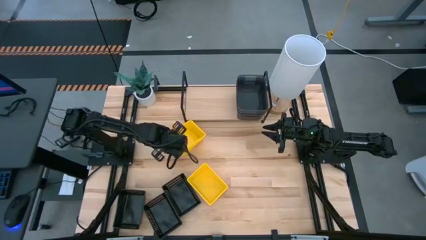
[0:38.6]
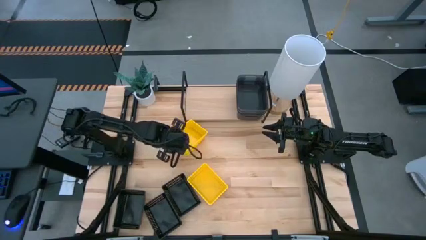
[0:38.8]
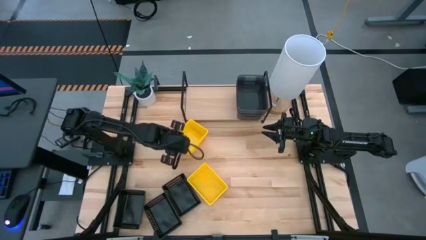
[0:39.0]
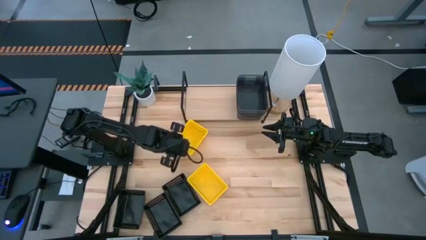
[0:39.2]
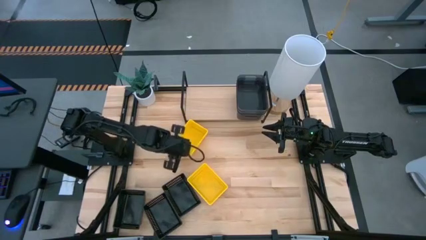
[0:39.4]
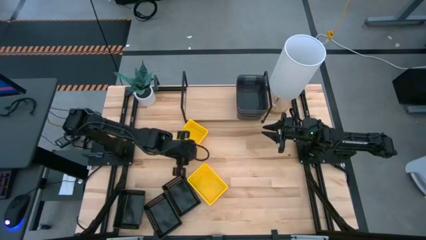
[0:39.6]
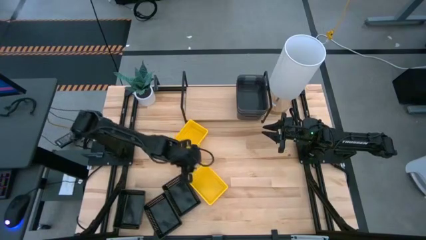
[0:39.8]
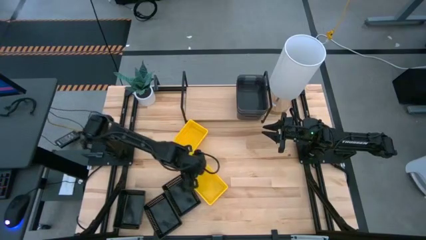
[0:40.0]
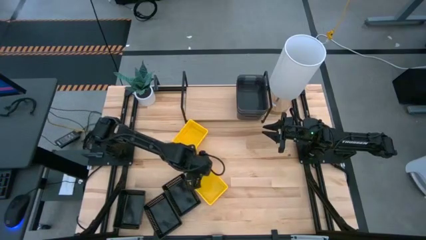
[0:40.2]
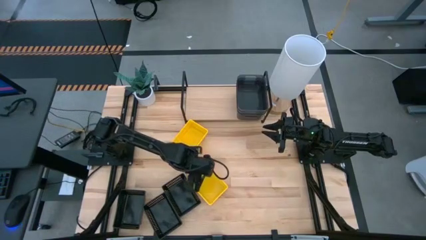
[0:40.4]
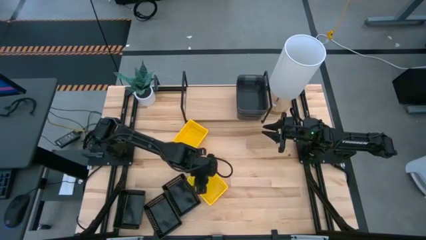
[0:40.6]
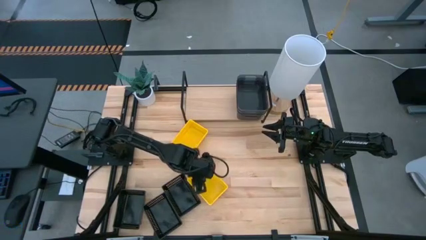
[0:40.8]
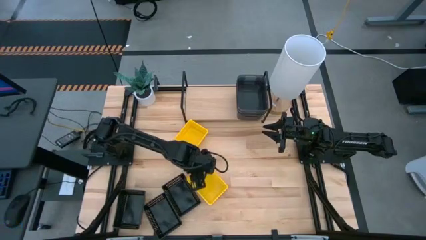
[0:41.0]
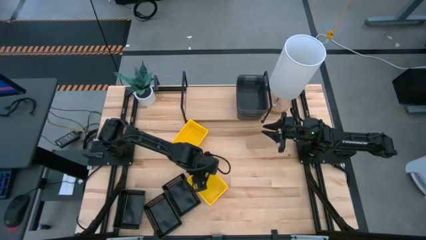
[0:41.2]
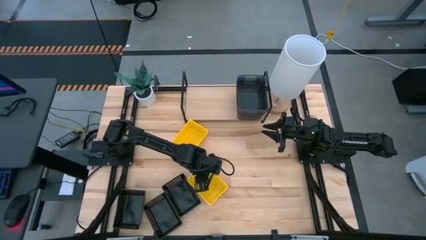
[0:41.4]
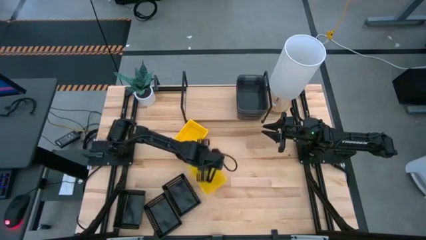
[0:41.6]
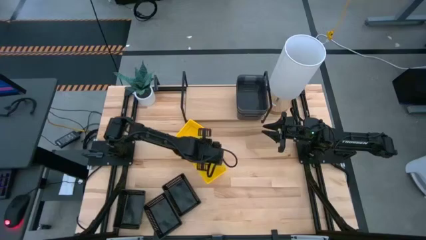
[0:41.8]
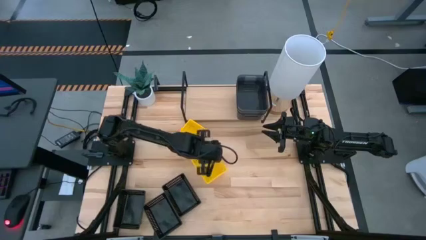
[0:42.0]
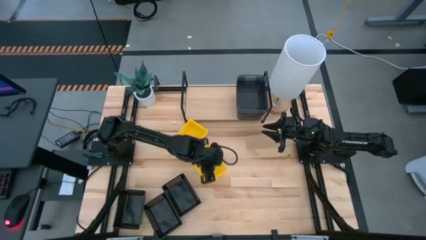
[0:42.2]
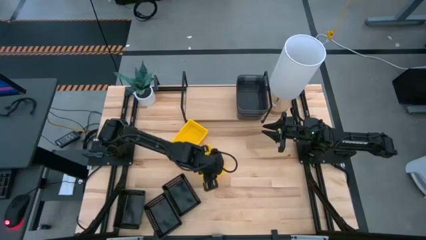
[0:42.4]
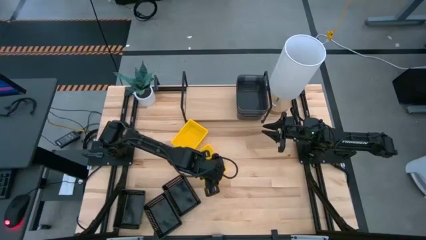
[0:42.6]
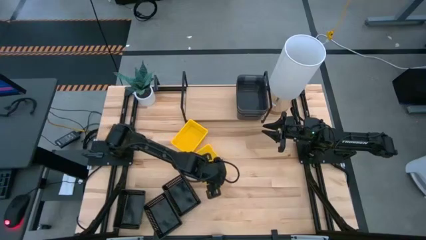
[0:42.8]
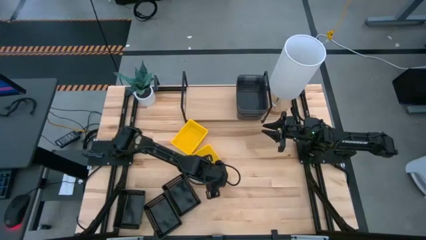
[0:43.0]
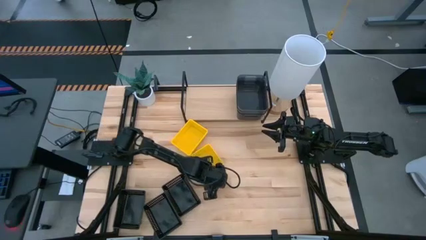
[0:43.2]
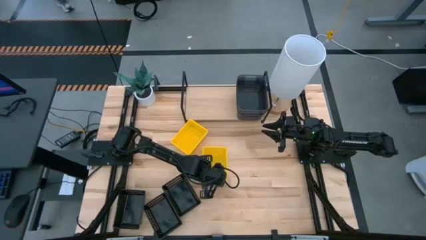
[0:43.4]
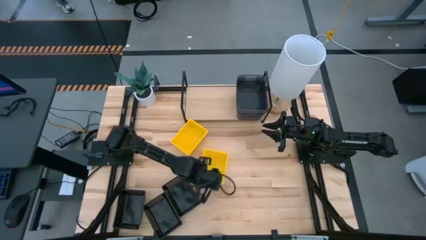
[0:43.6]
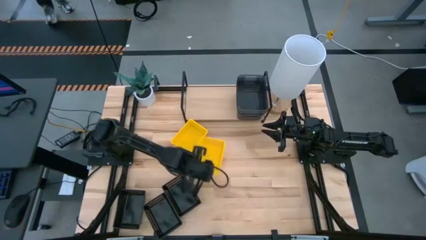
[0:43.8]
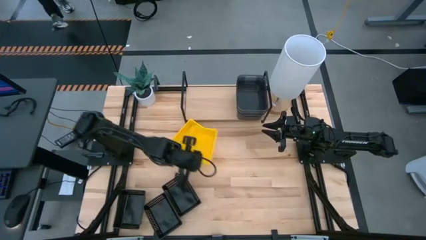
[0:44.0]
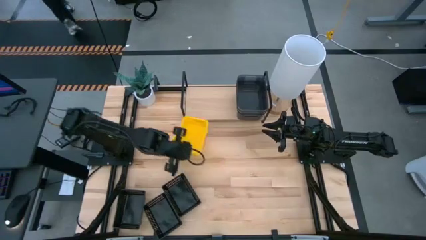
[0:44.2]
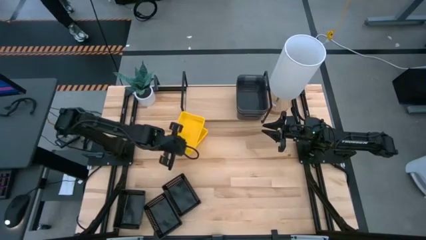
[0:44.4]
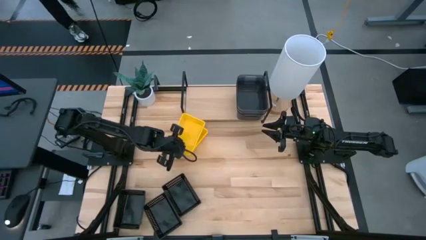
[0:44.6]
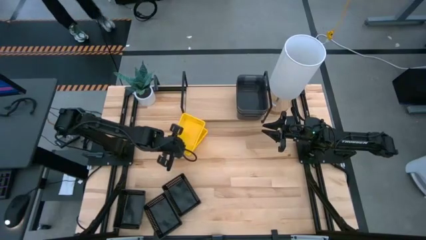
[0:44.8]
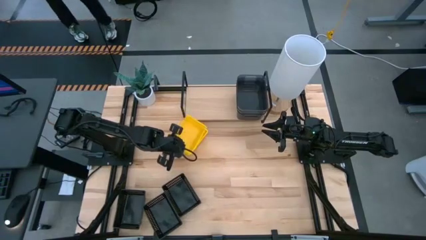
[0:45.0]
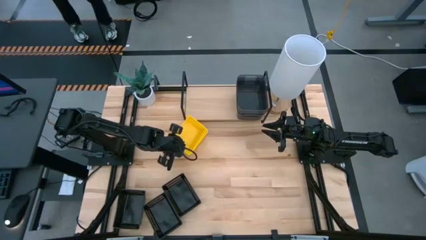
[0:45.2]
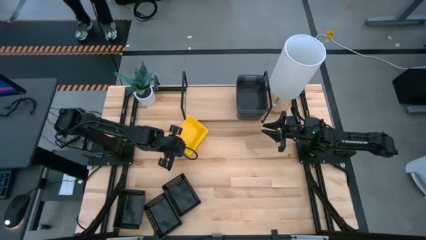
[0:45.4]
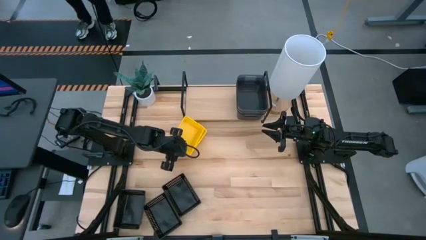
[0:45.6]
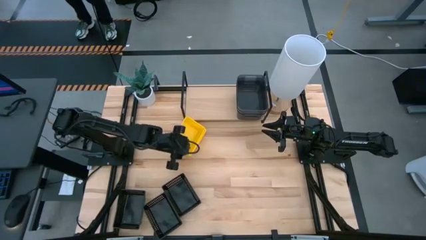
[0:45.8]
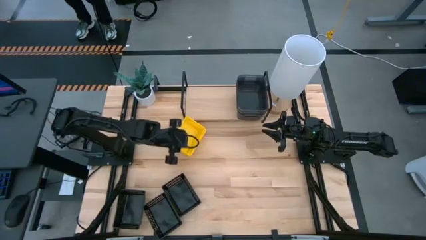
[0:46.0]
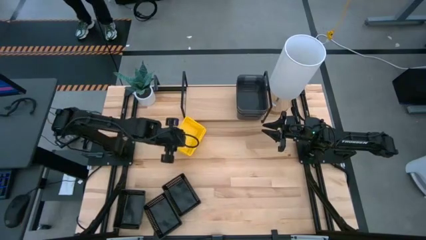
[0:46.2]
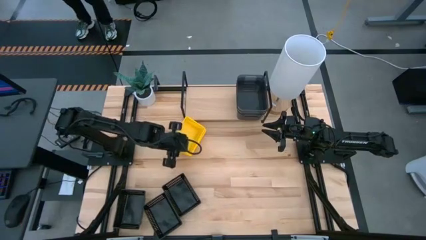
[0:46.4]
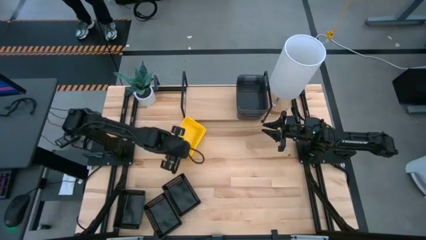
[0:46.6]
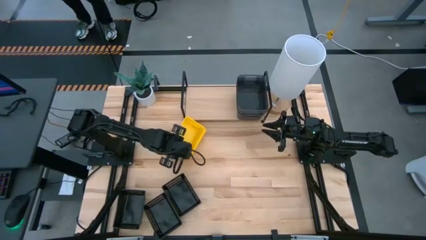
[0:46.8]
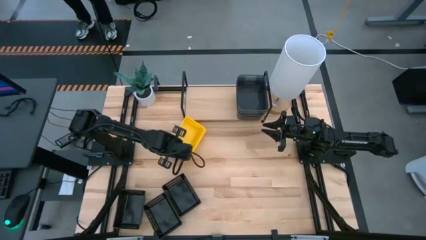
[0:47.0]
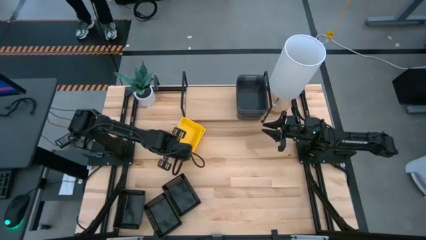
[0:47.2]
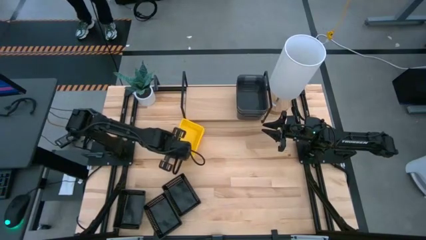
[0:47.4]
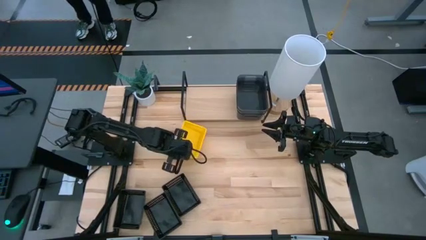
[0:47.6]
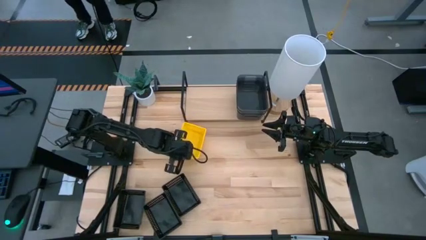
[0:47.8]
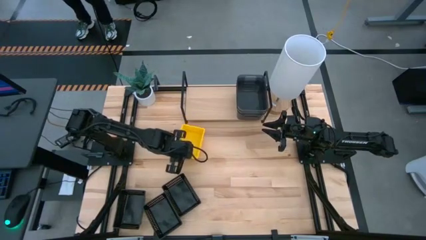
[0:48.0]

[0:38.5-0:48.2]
Task: Stack baskets on shelf by color
Stack the bottom yellow bin on the top yellow bin

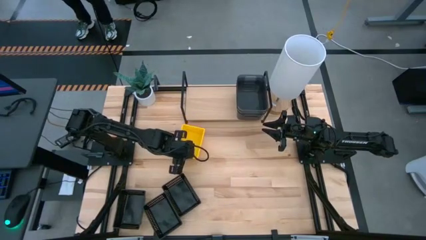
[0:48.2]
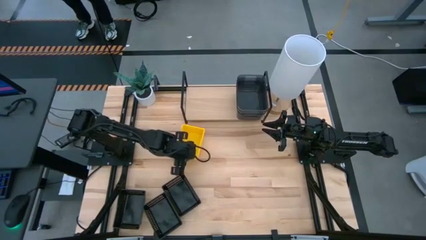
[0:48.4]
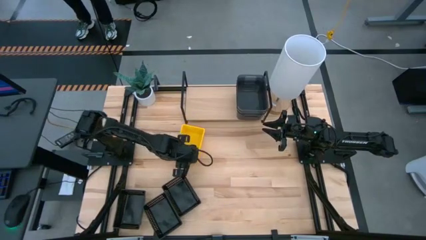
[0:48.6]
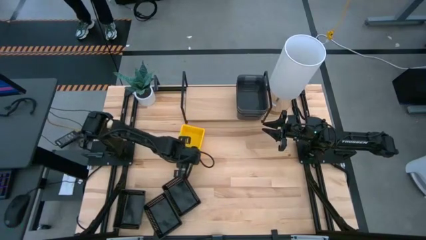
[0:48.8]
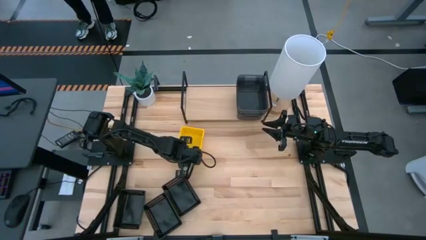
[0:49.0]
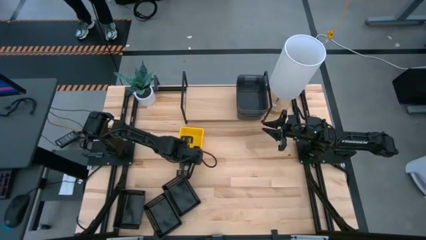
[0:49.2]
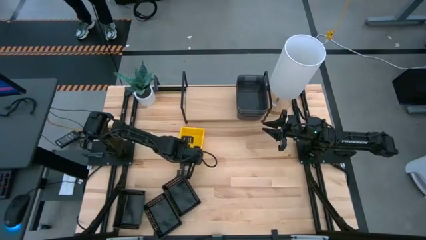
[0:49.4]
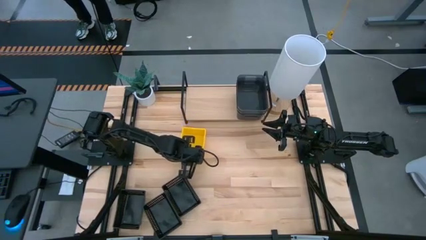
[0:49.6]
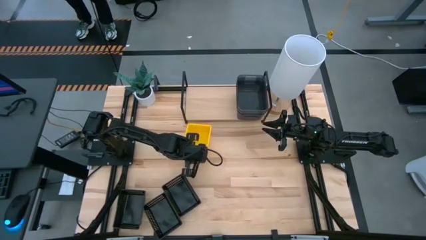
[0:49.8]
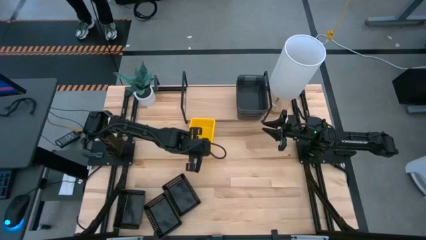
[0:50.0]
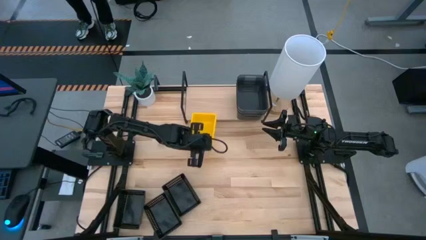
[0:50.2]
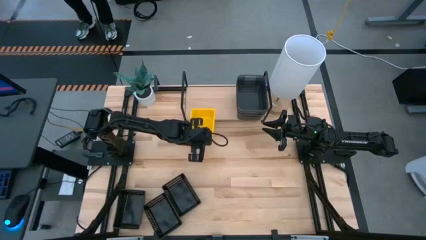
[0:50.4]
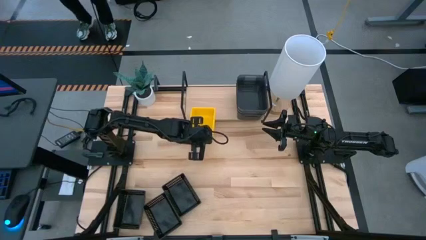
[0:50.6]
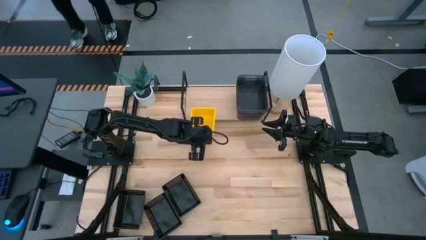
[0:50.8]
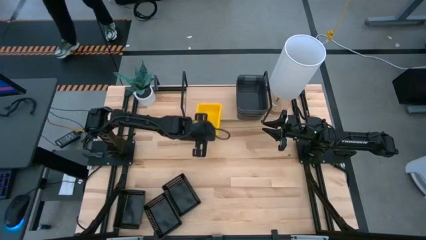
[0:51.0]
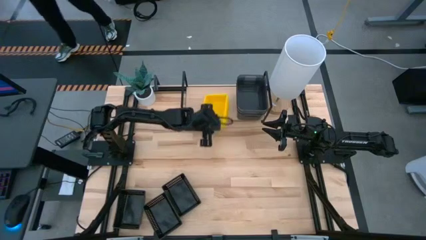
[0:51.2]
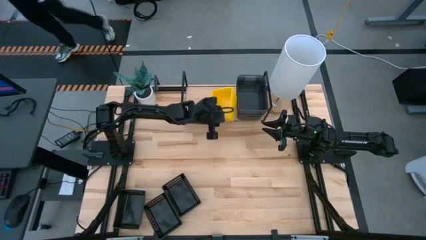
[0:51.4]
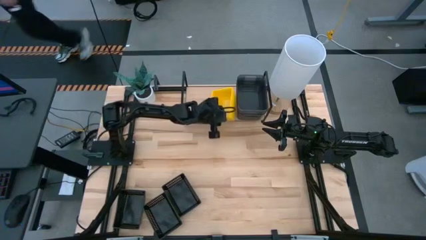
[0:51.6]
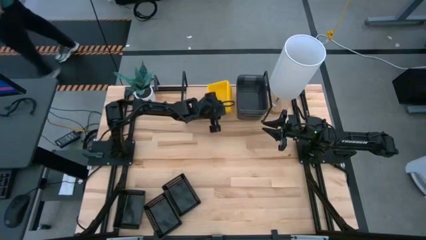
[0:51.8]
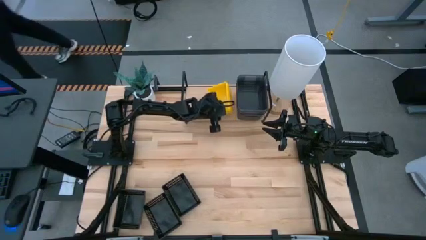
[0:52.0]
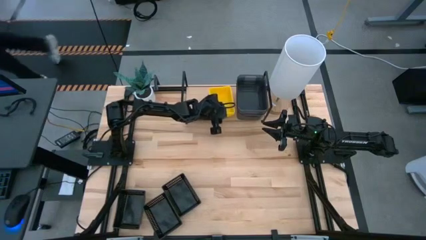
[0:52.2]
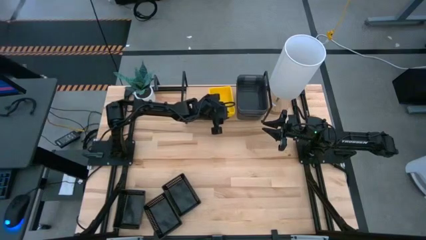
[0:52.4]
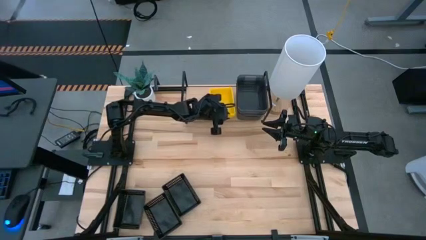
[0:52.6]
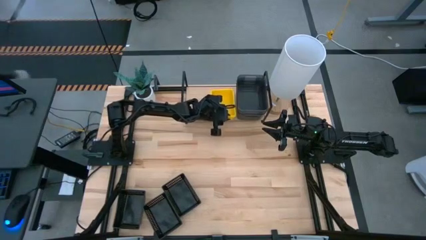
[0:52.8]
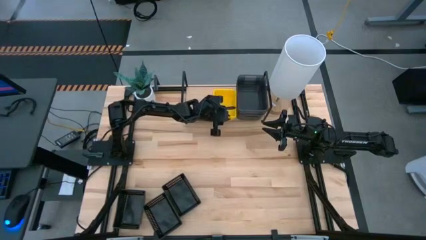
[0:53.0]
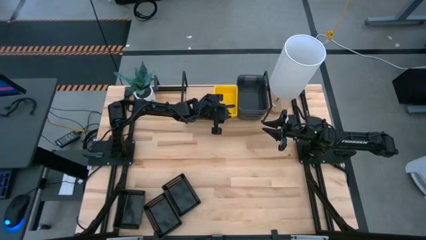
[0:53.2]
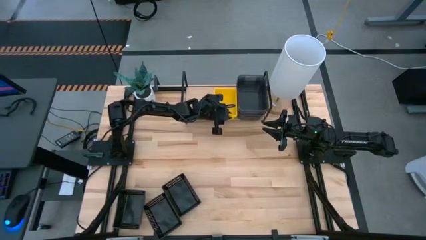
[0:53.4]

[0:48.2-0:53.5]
Put the yellow bin on the shelf
